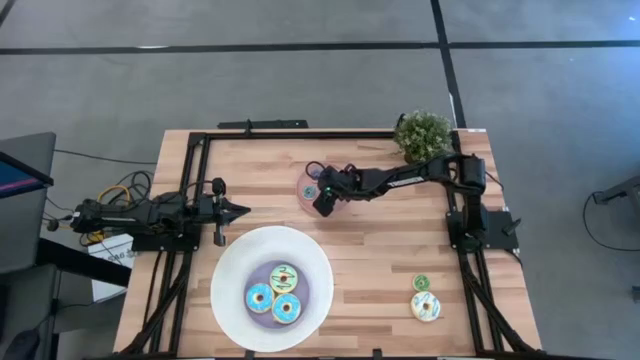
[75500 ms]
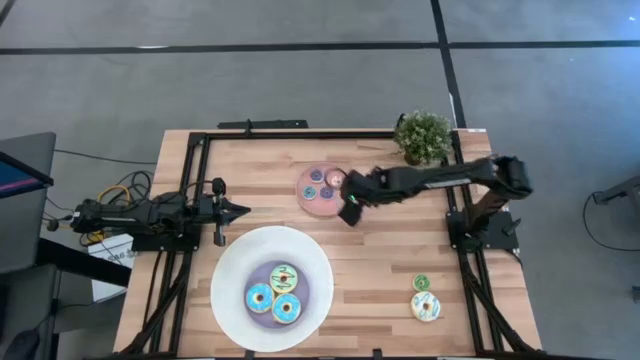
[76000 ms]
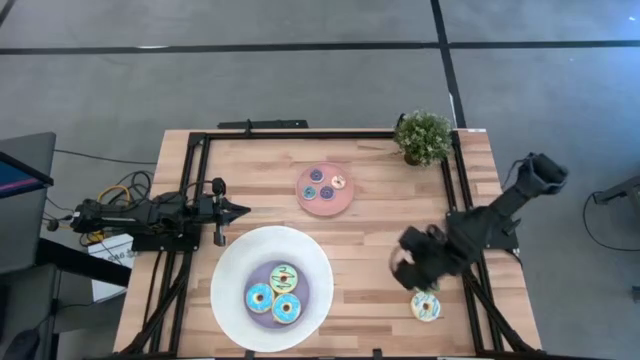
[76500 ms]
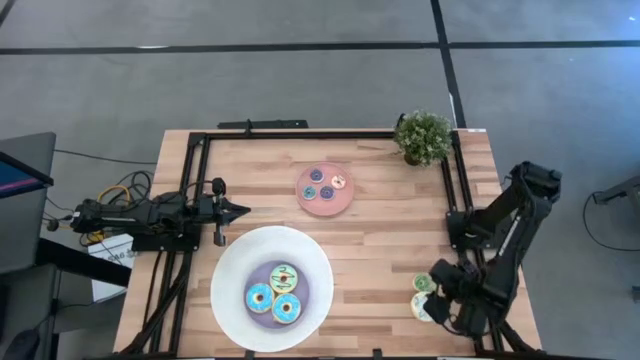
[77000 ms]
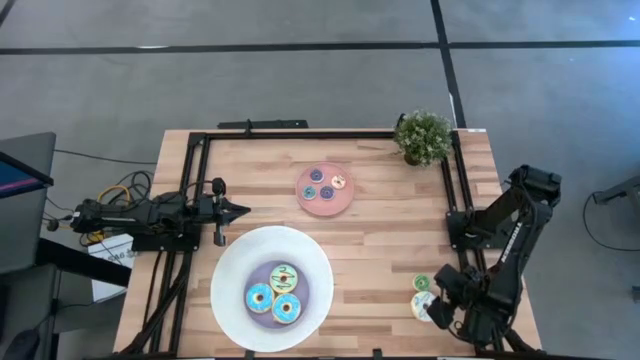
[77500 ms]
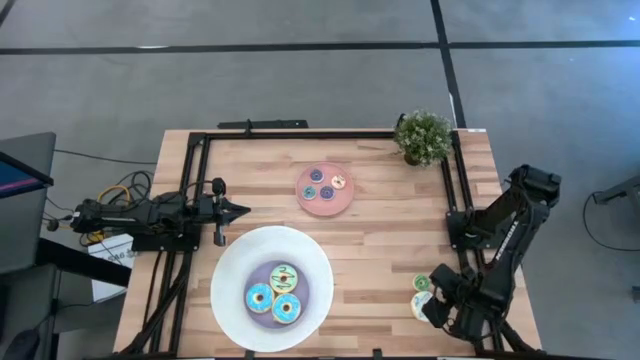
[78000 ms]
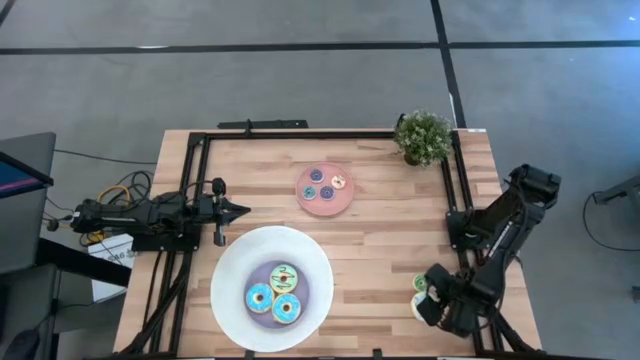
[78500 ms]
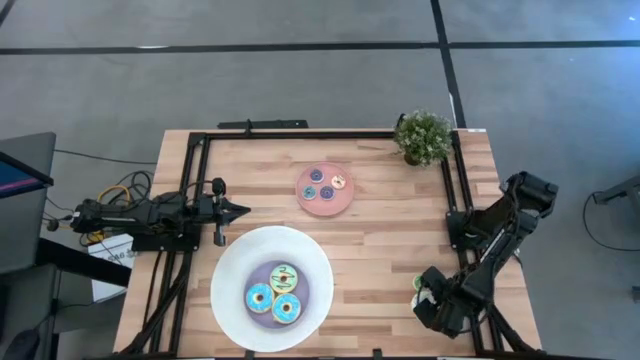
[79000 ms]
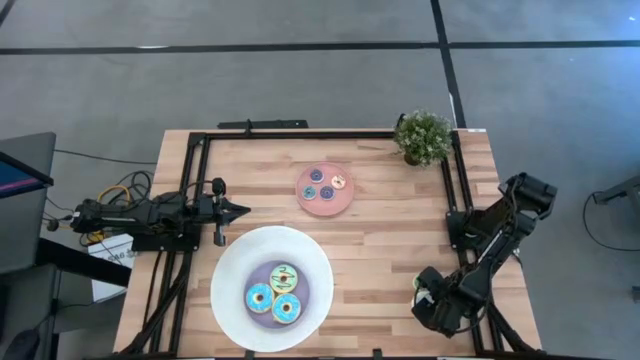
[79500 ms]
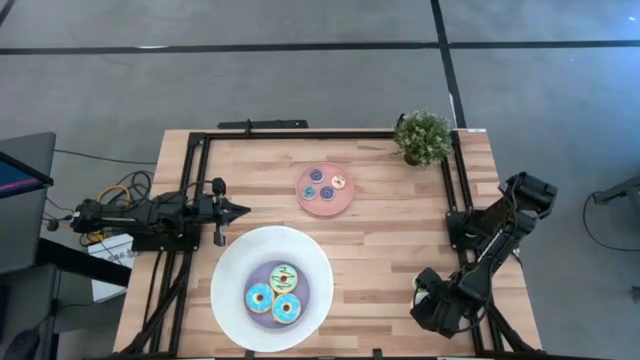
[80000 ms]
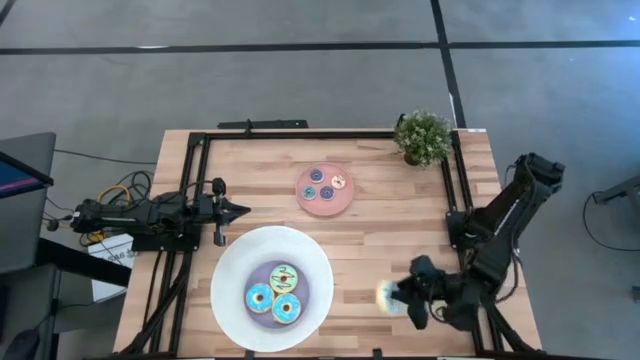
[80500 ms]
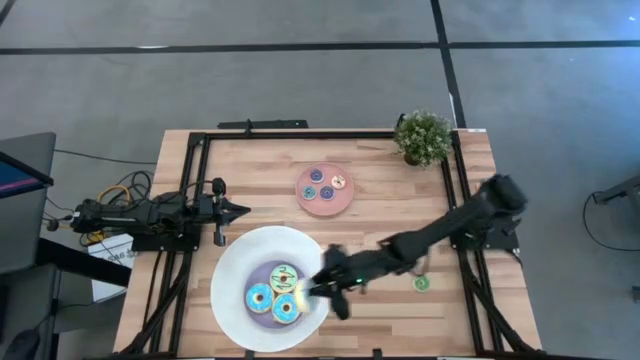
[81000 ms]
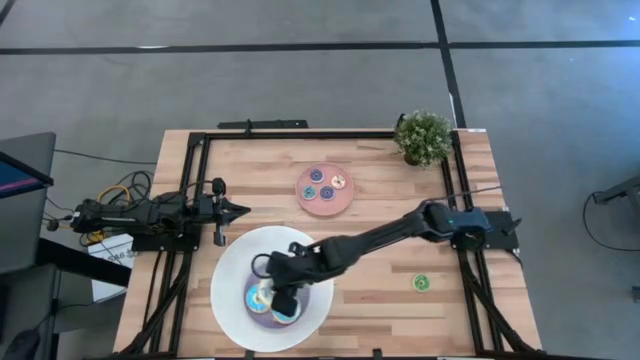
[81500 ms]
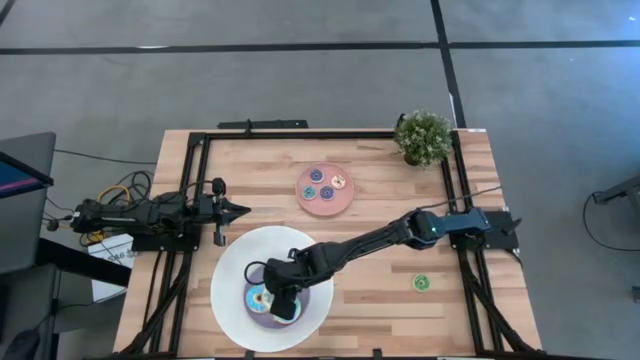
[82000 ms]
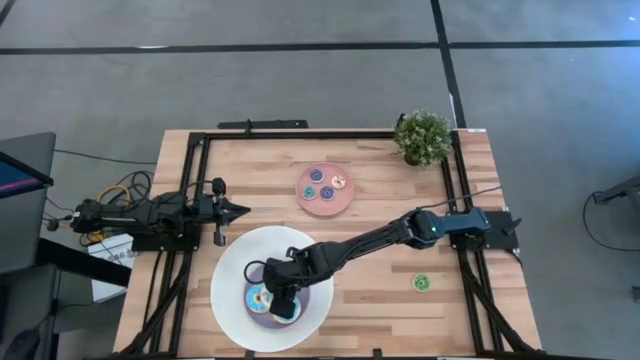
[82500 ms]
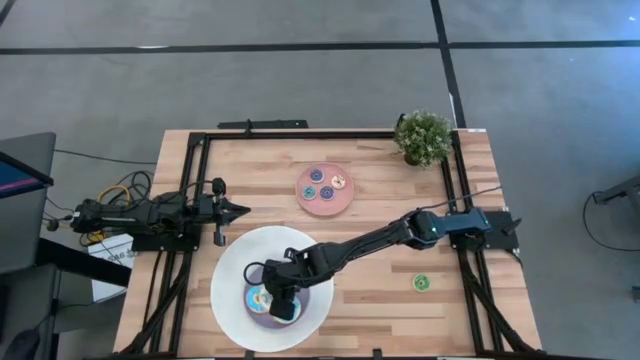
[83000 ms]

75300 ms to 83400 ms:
Task: Pick & Place donuts
Put the big white donut on the purple plate

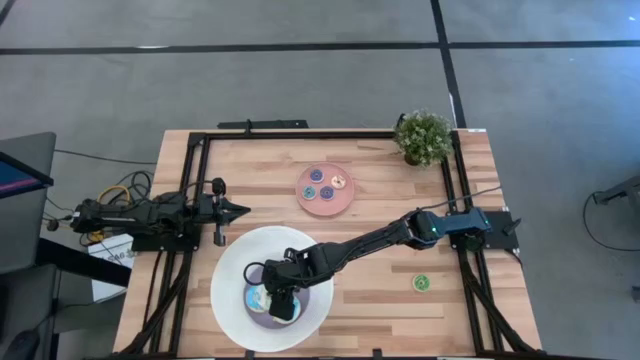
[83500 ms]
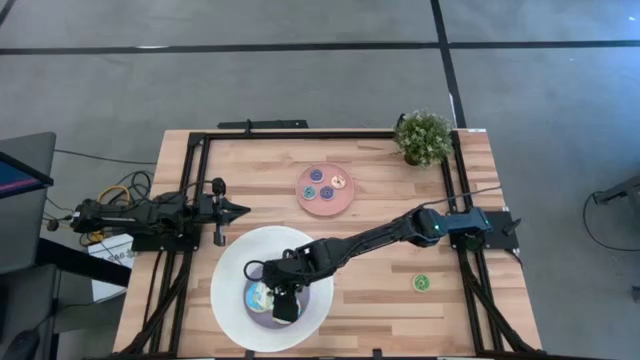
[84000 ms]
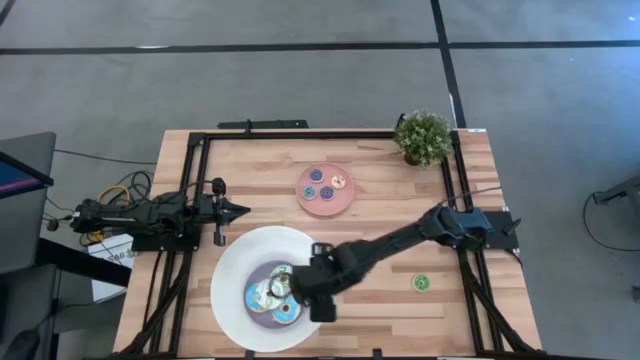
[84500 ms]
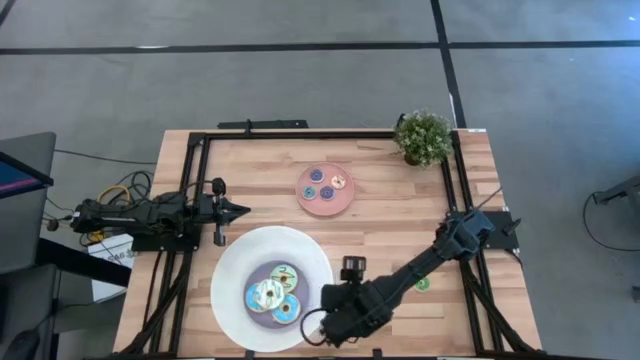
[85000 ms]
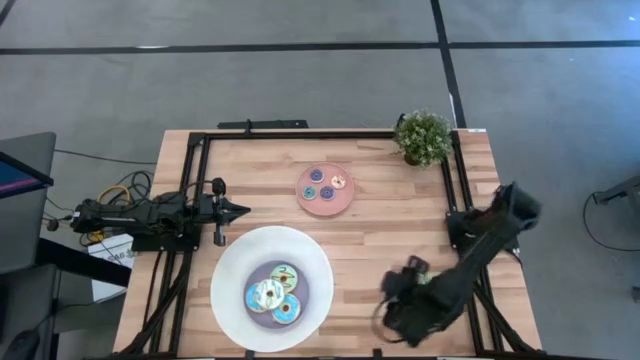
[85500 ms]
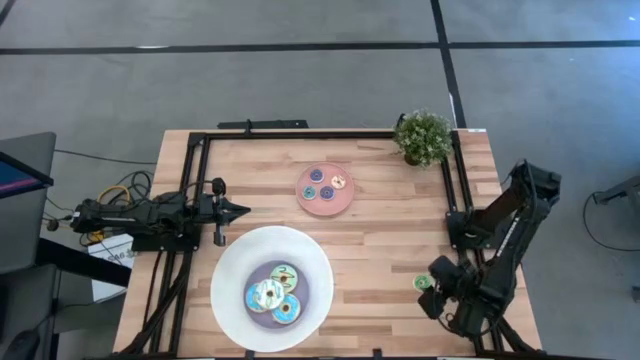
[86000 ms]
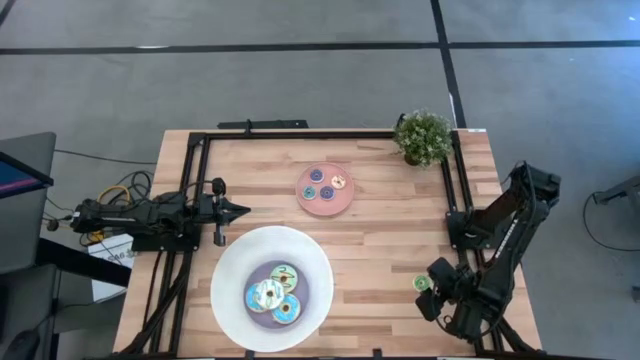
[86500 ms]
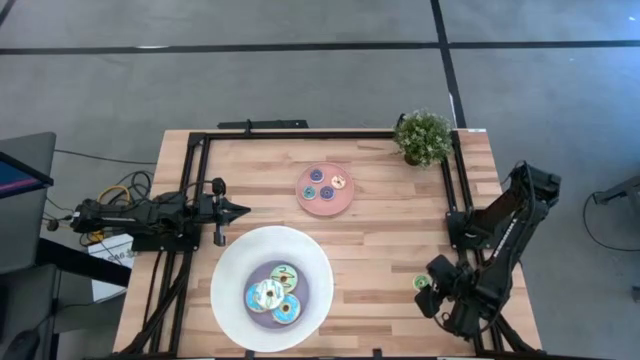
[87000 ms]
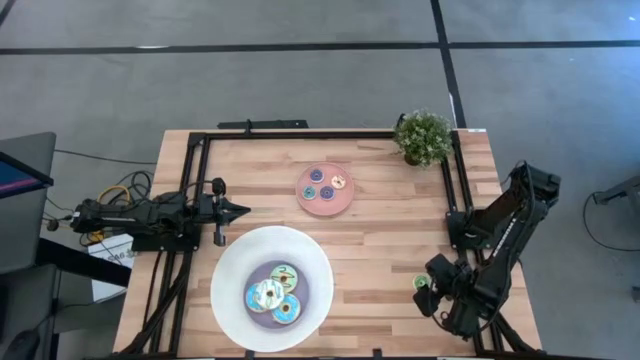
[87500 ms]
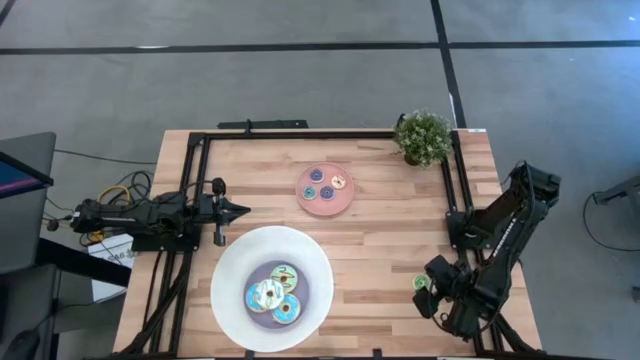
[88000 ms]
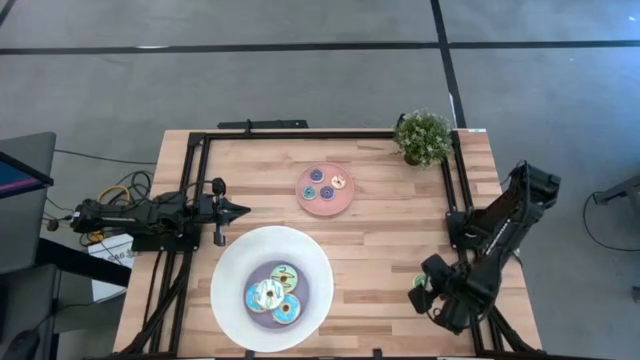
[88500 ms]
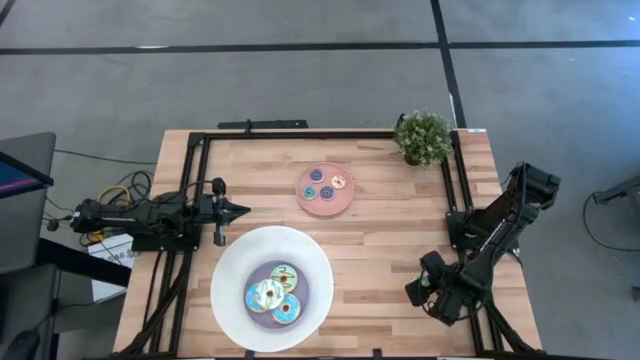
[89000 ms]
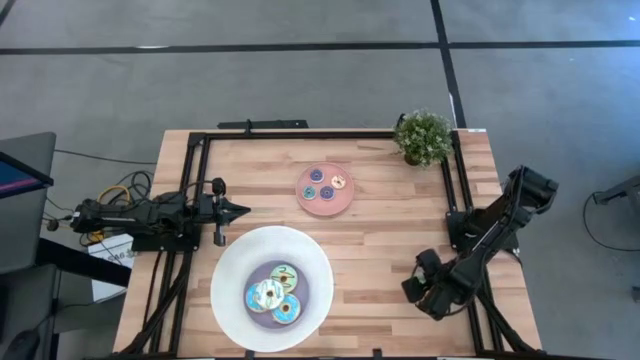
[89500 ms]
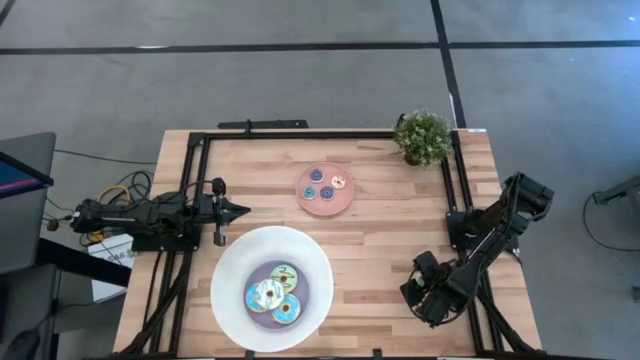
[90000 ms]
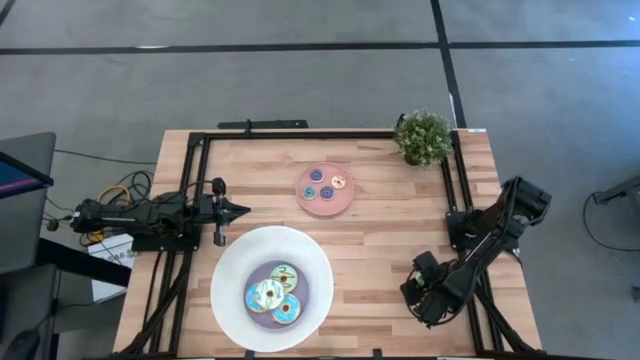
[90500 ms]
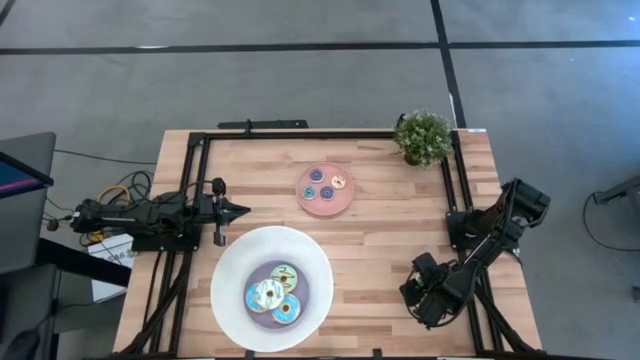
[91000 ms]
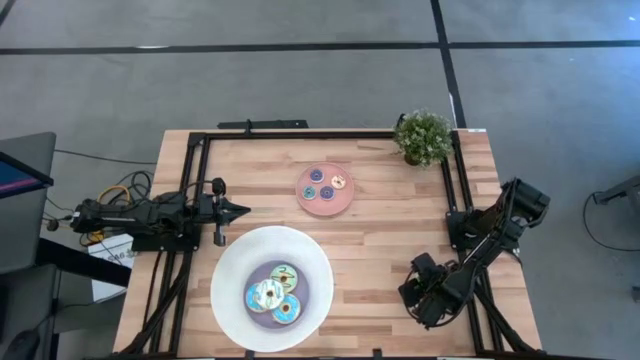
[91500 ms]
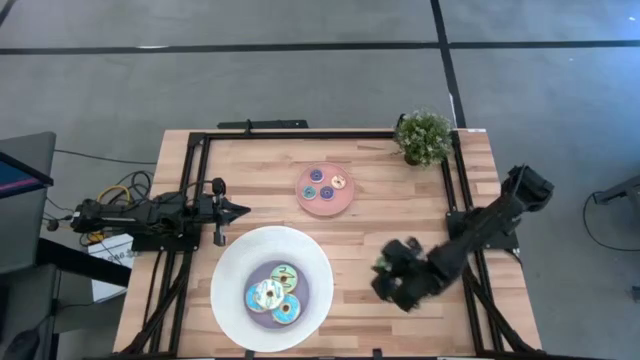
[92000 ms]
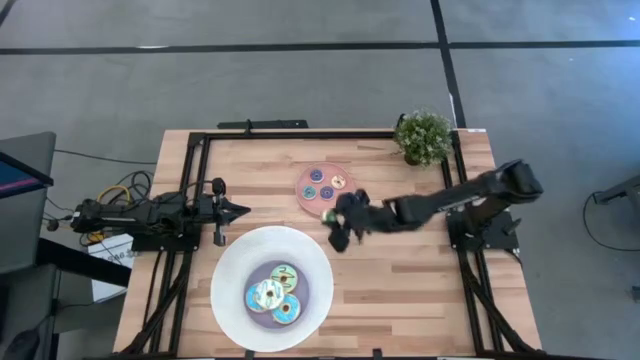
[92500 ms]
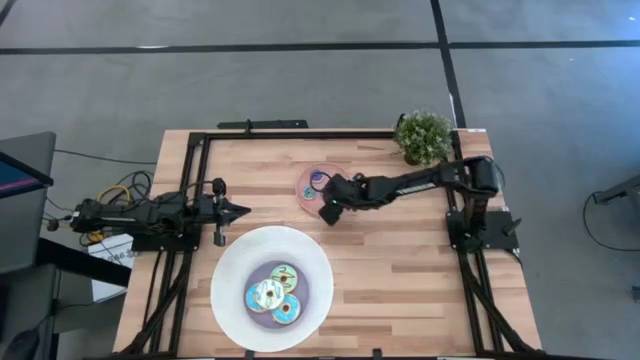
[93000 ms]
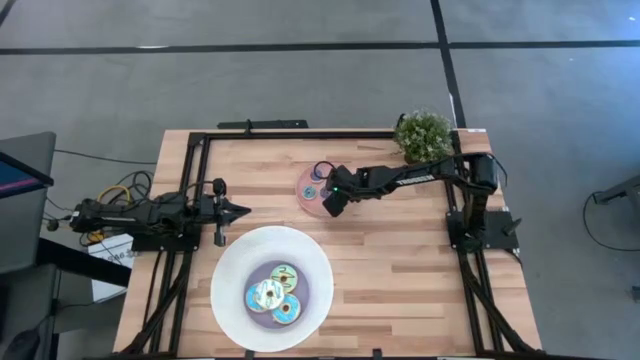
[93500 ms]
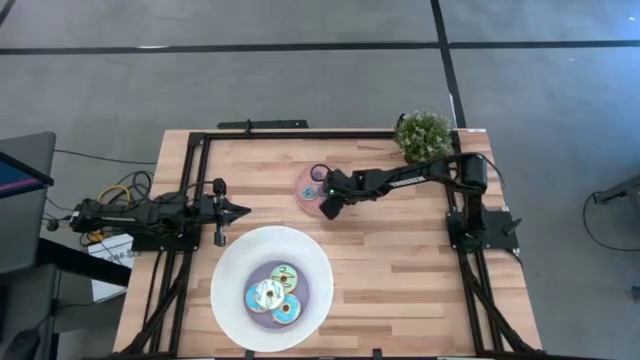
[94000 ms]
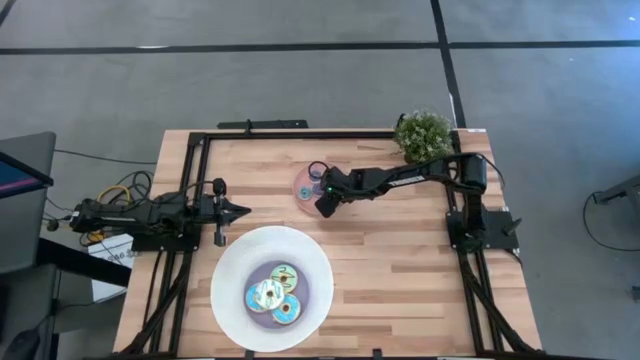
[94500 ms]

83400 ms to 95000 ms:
Put the small green donut on the pink plate

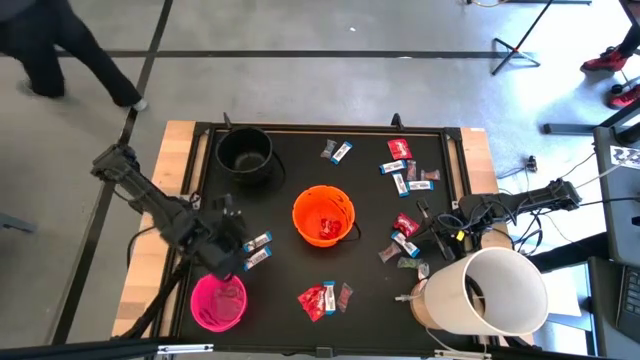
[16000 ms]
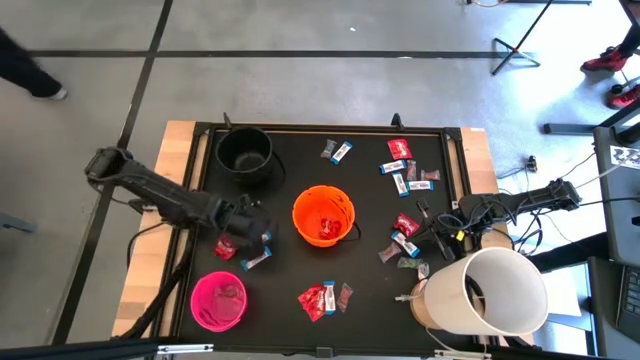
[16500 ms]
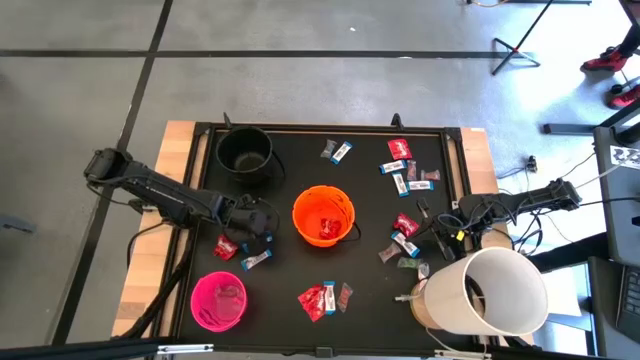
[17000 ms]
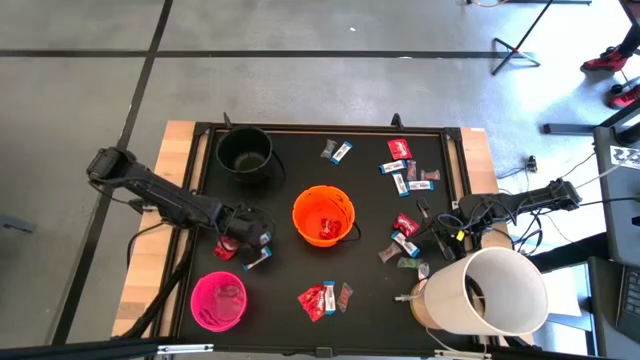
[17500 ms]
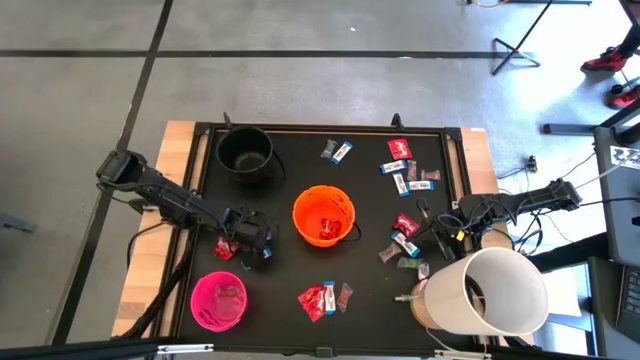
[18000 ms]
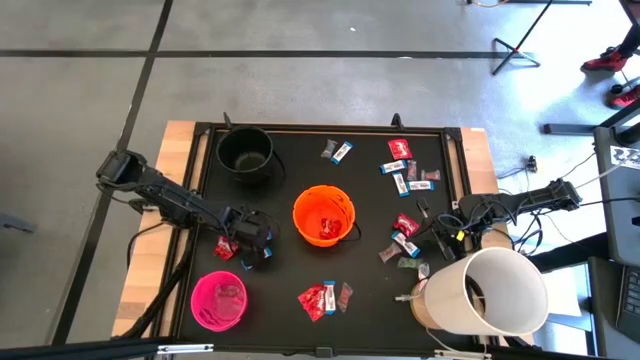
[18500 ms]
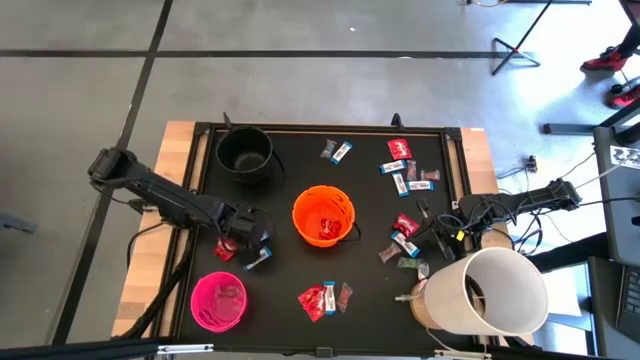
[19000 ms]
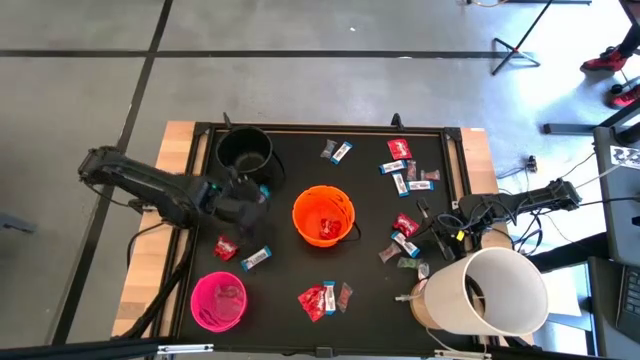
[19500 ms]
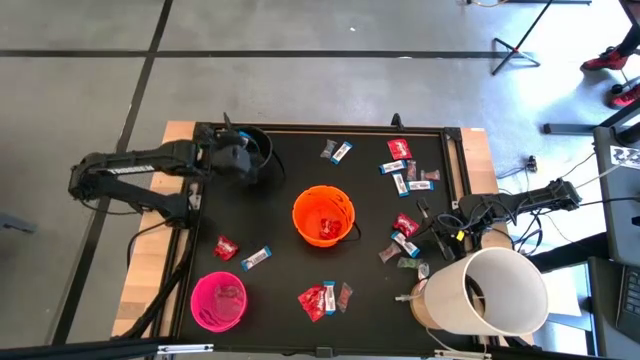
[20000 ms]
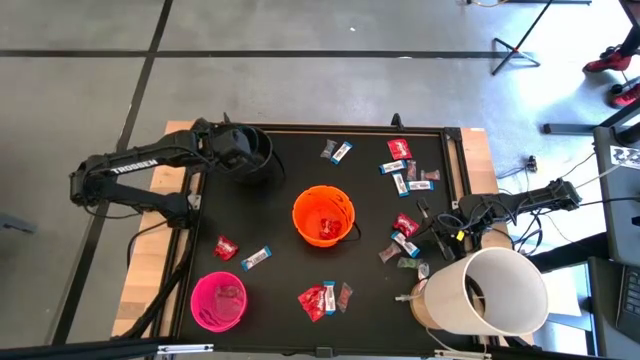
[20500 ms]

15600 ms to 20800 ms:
Task: Sort candy
Put the white chocolate into the black bucket
